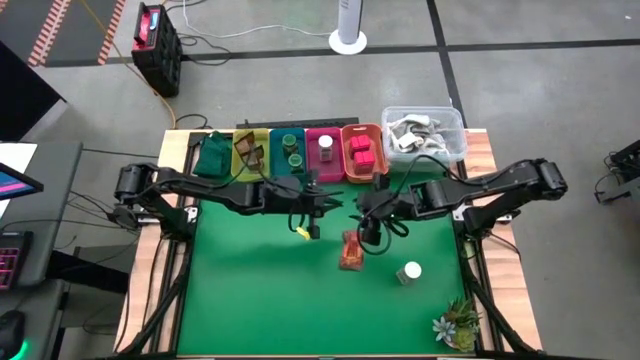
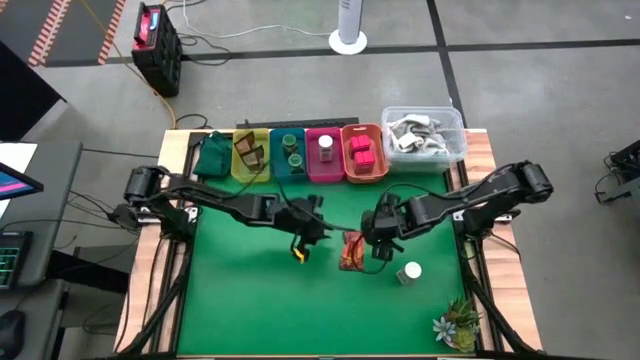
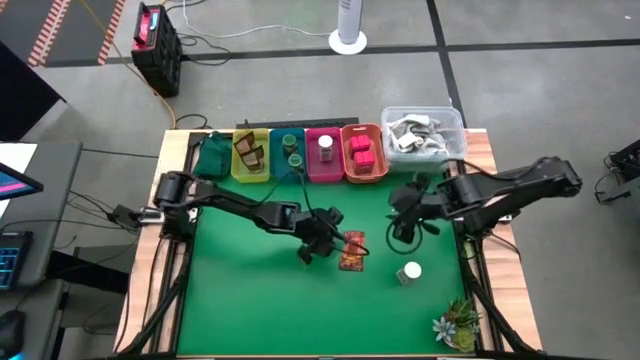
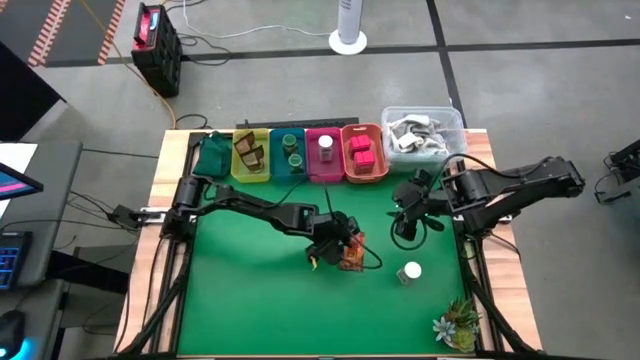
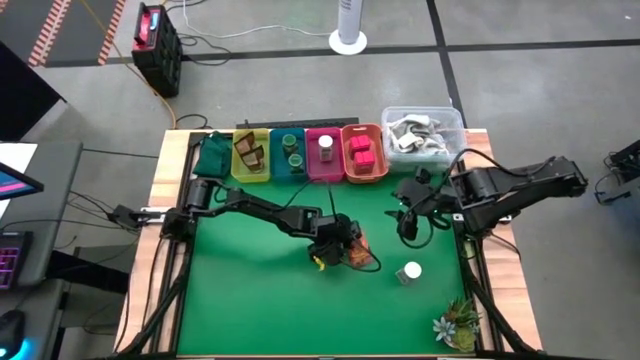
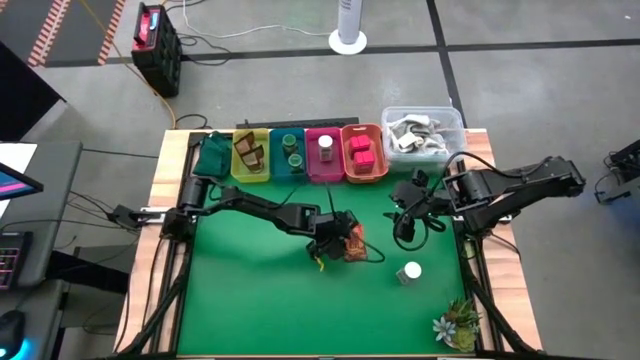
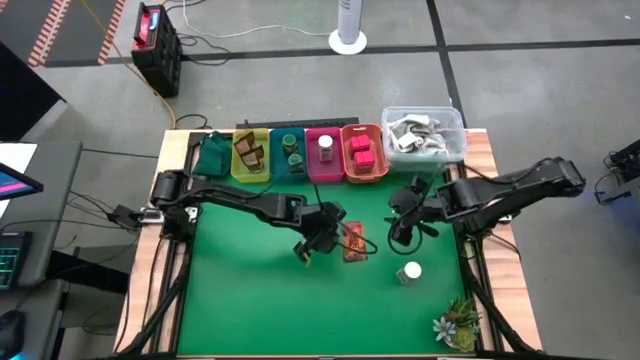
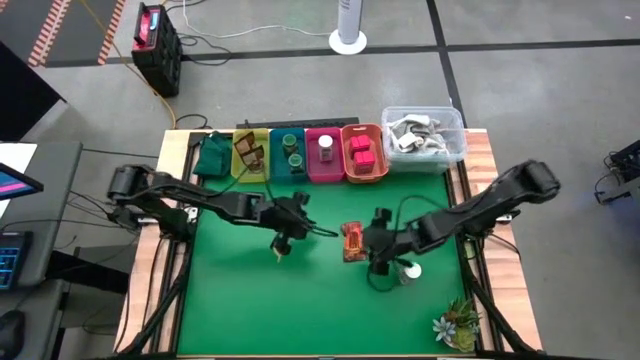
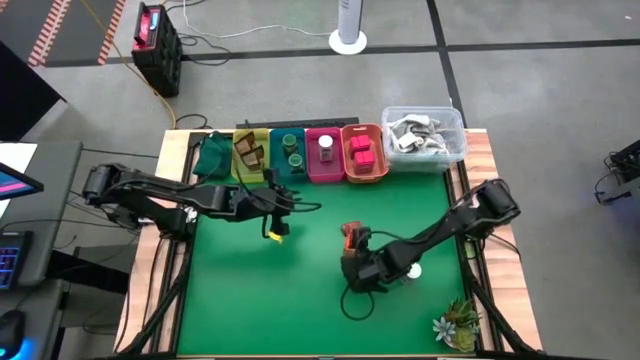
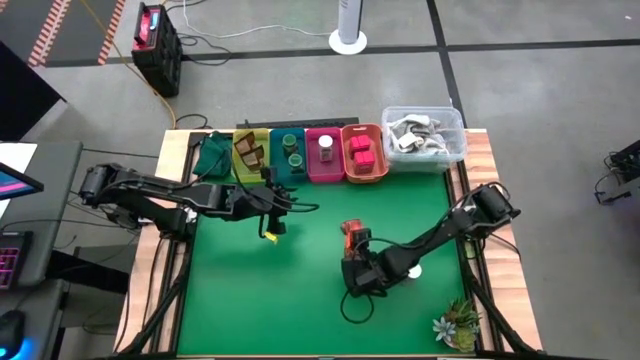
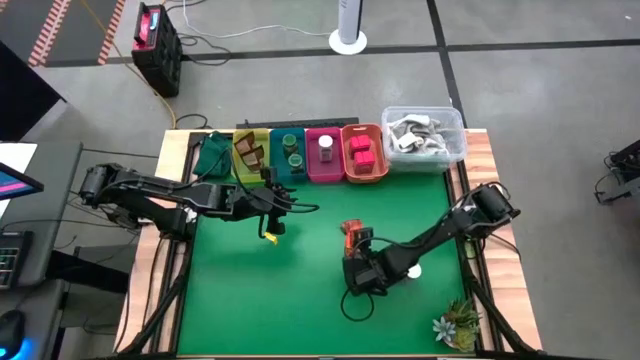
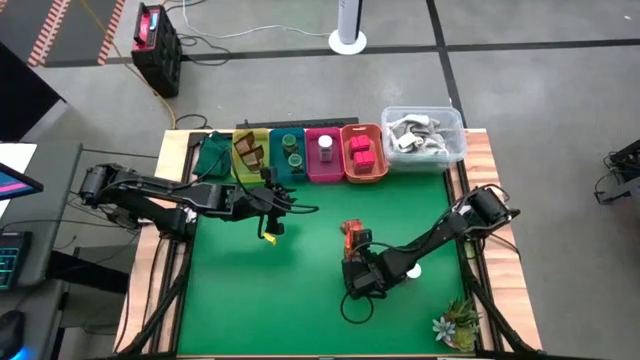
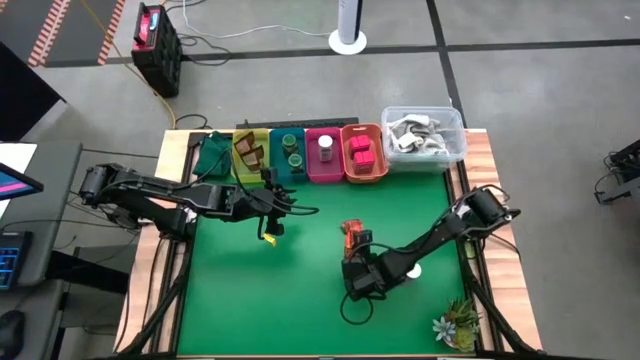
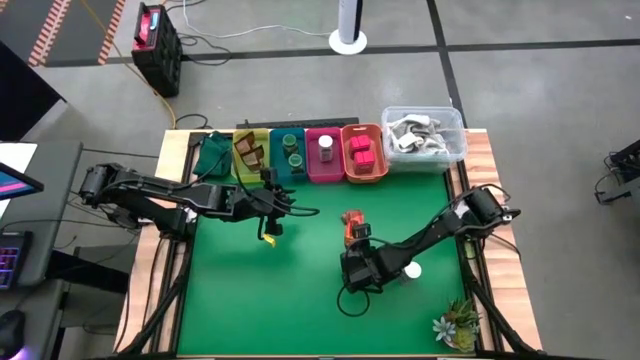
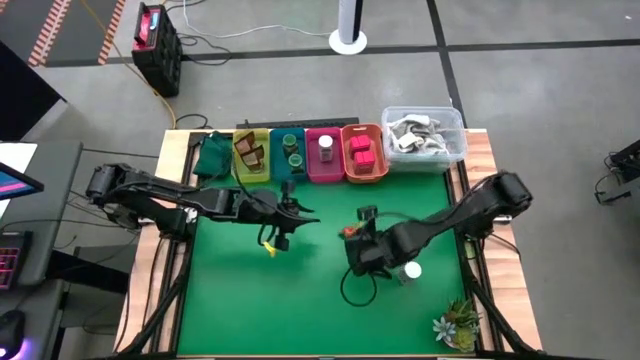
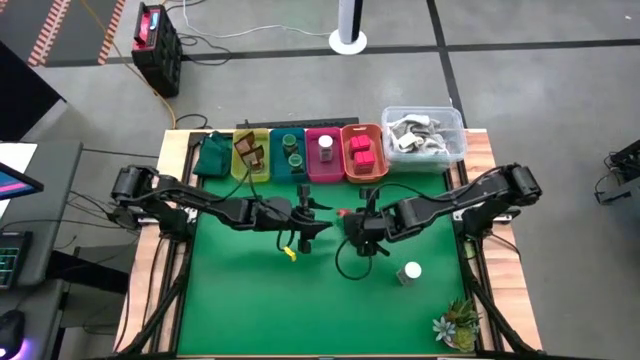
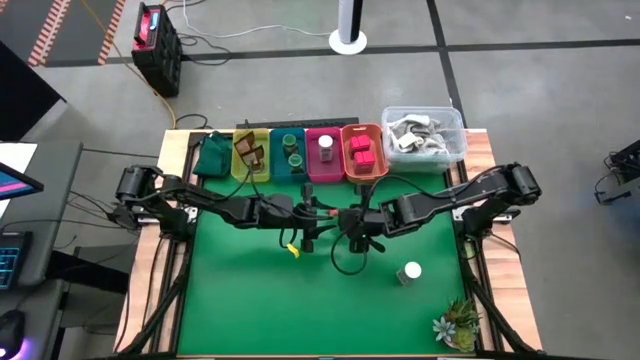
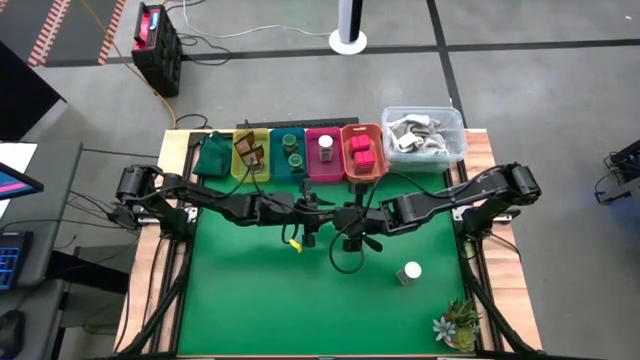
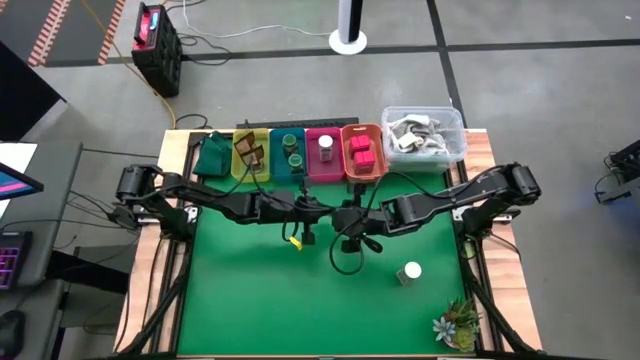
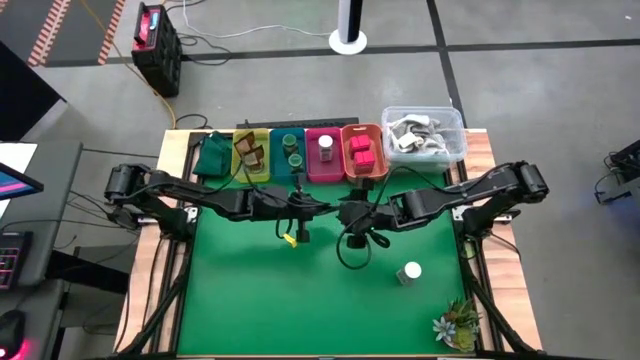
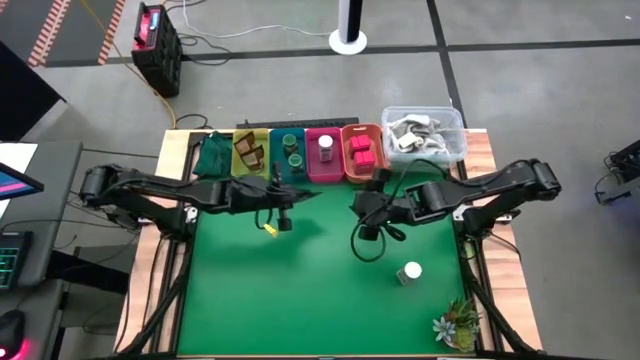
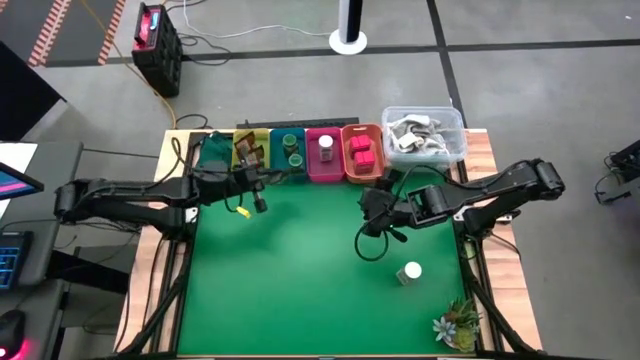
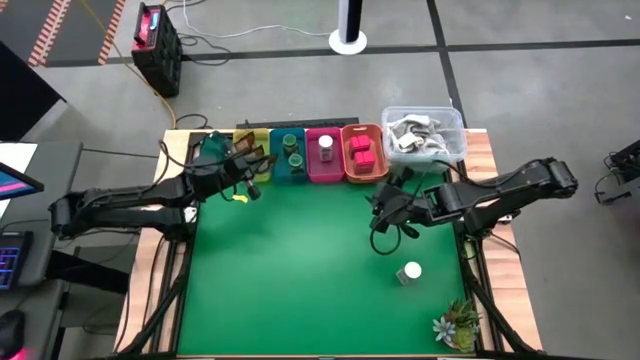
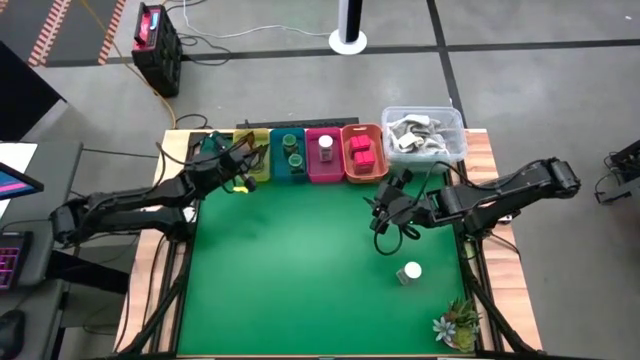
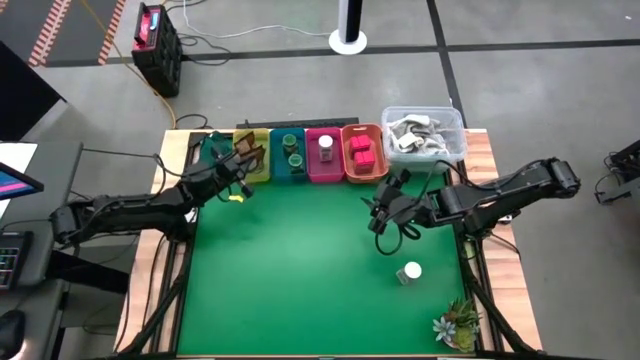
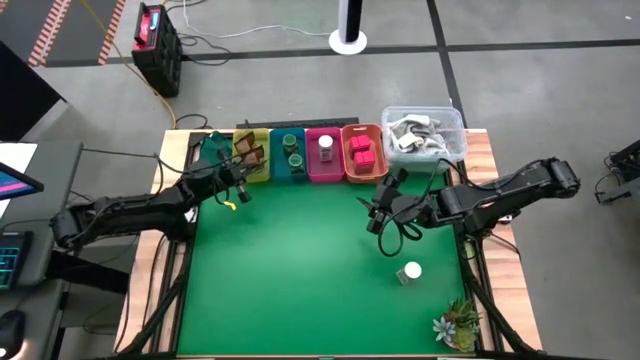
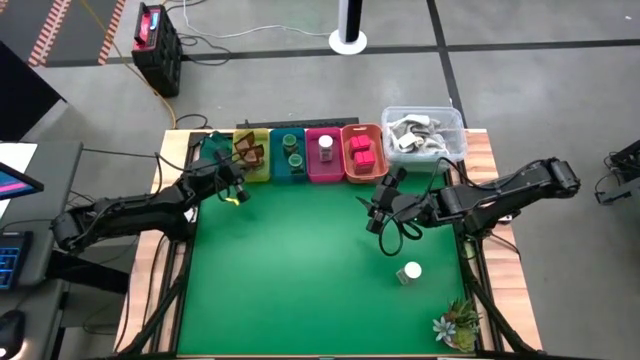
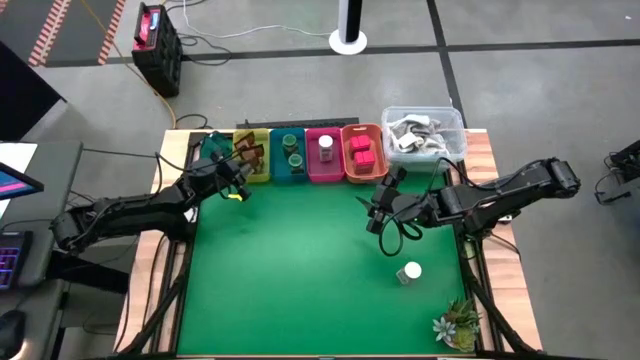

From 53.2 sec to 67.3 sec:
Task: Sort spices by type
Put the orange spice pack into the yellow bin

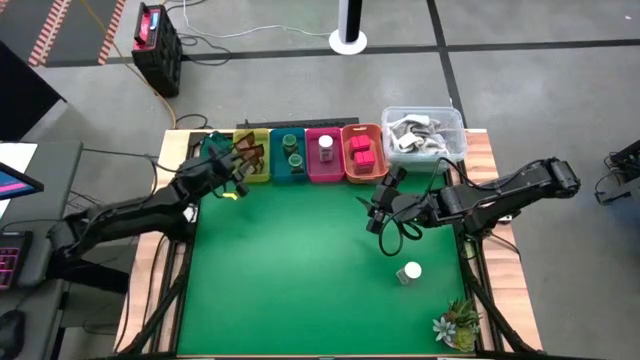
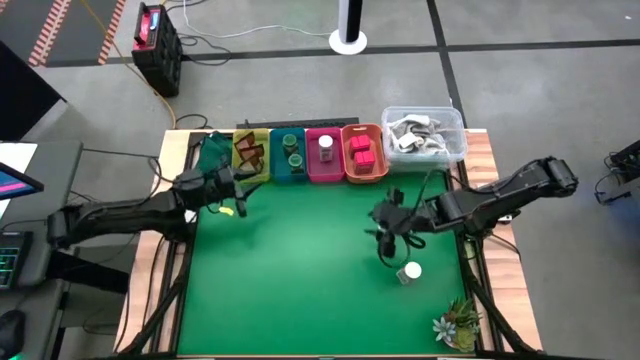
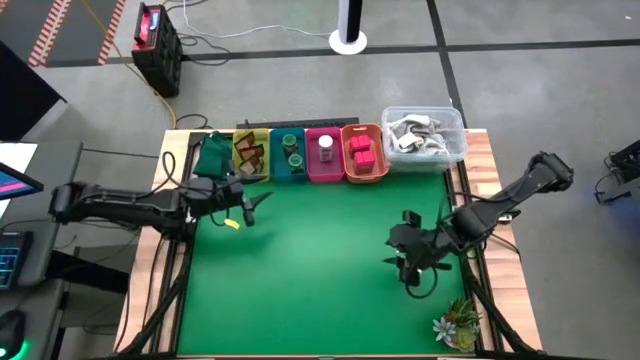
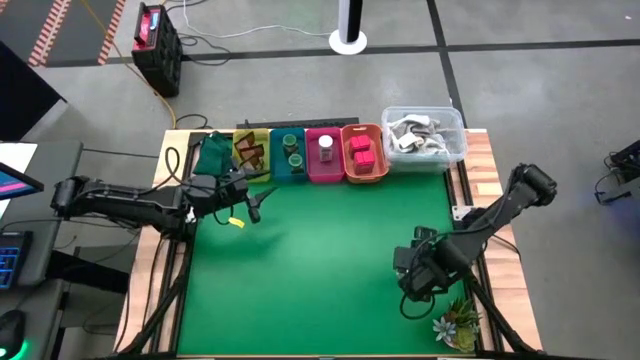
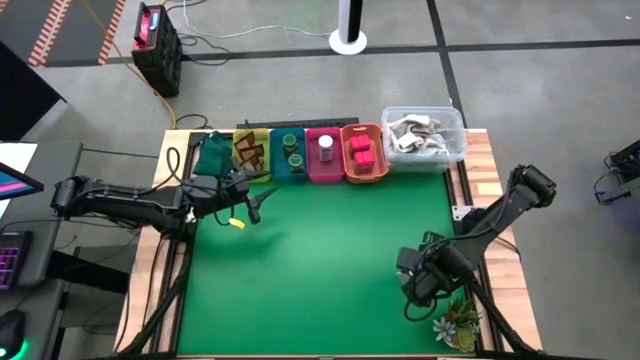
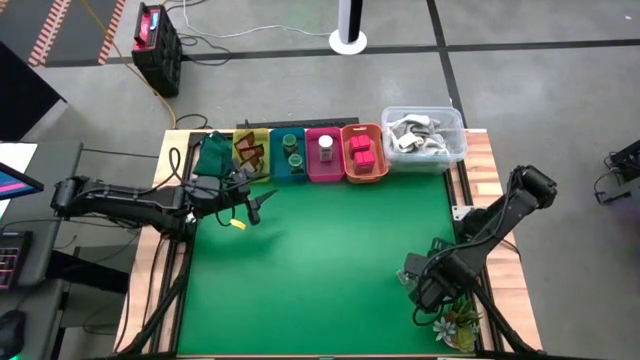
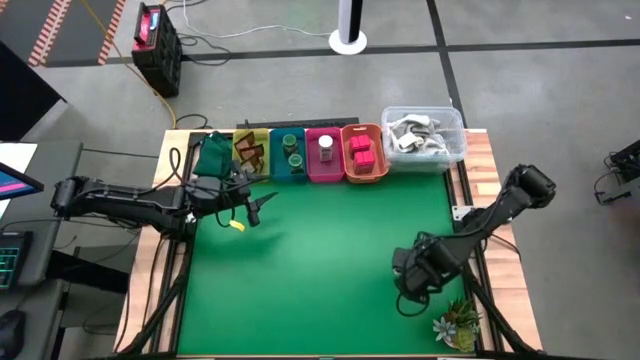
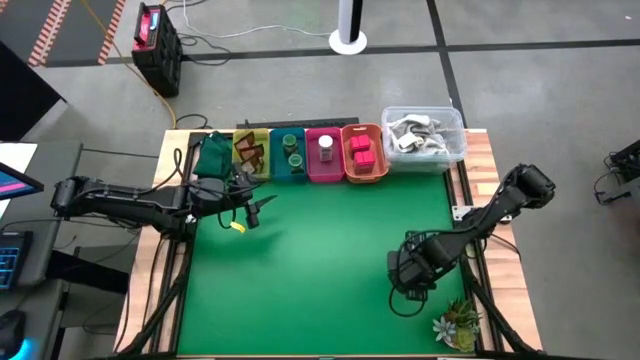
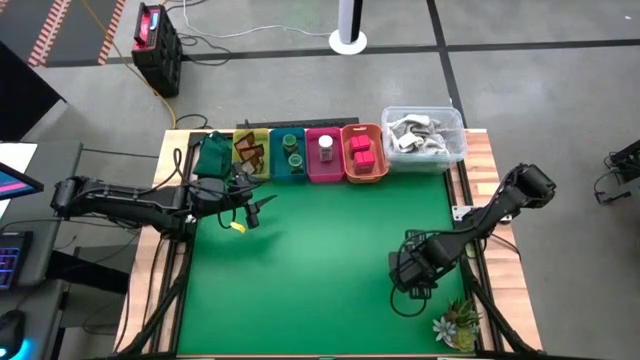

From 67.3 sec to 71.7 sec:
Put the white spice seasoning bottle into the pink bin

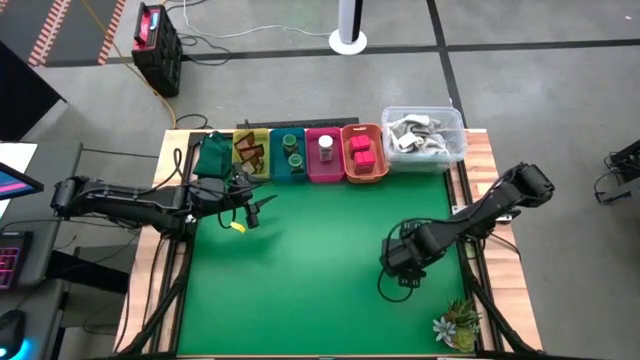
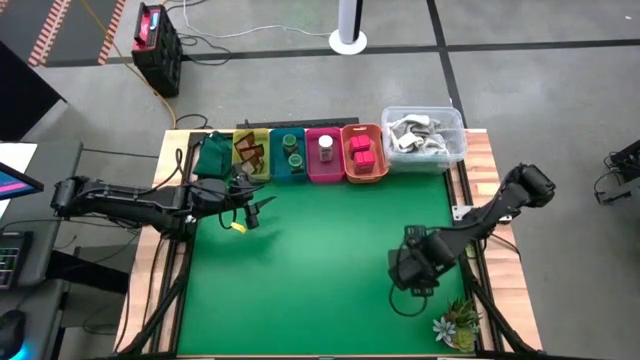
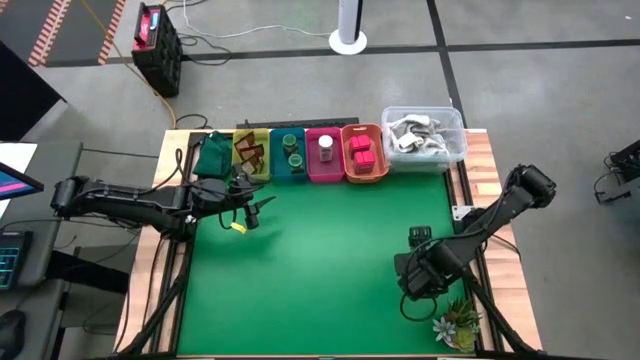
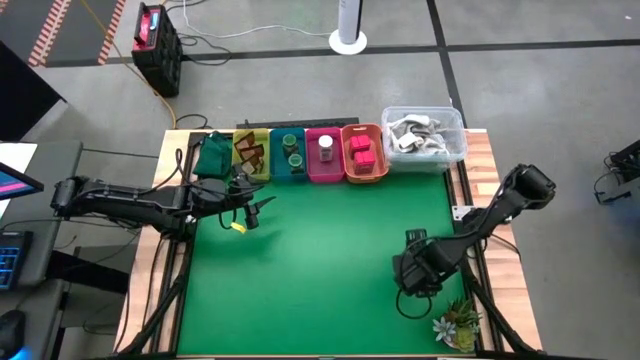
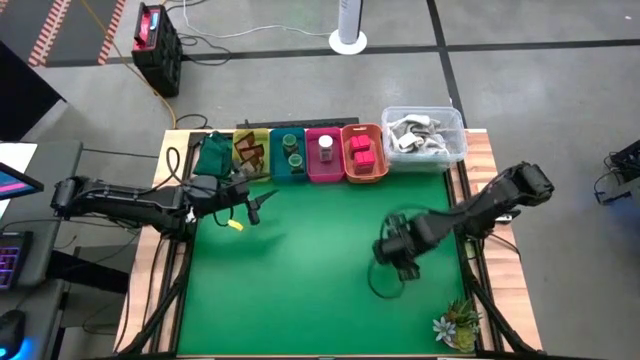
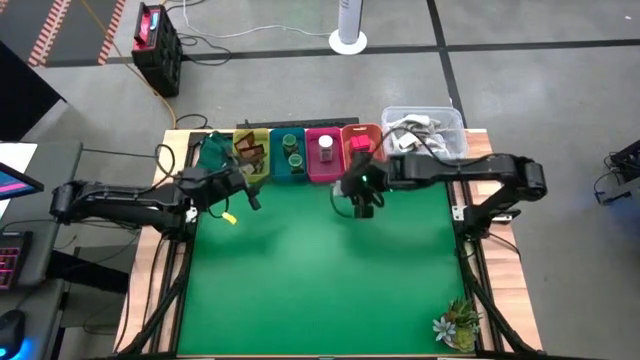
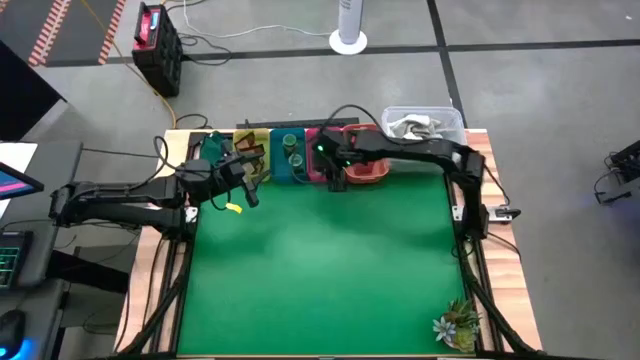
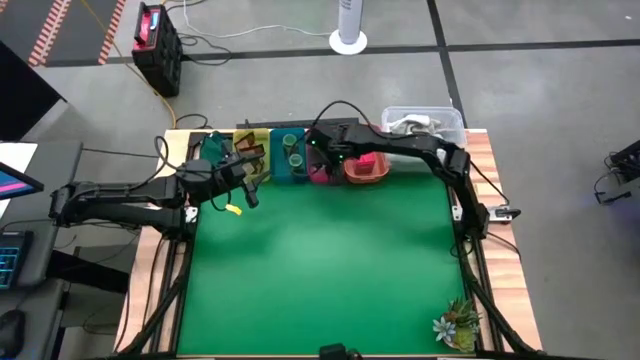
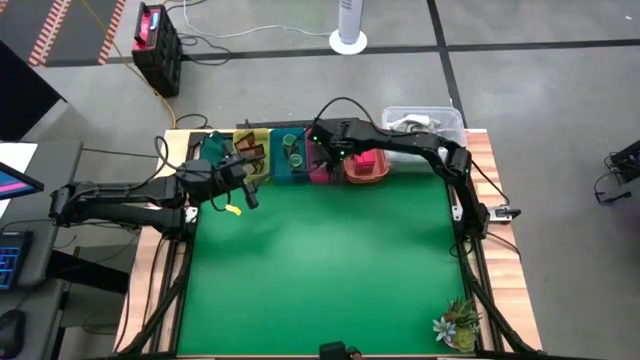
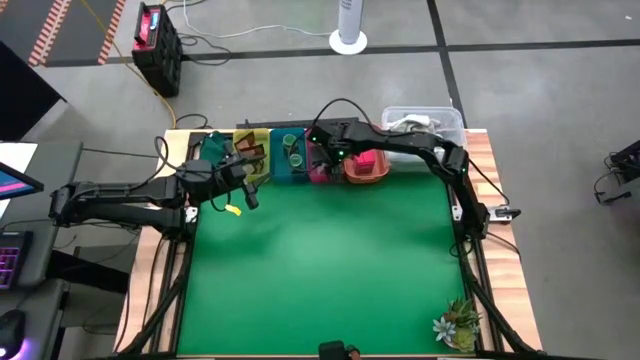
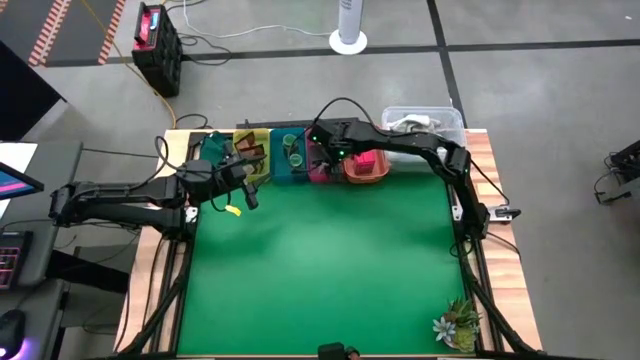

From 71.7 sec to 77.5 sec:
Put the white spice seasoning bottle into the pink bin
